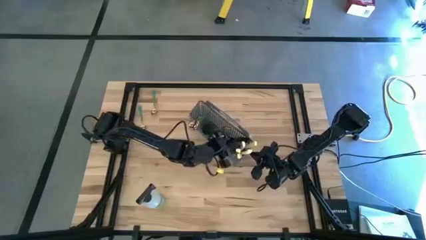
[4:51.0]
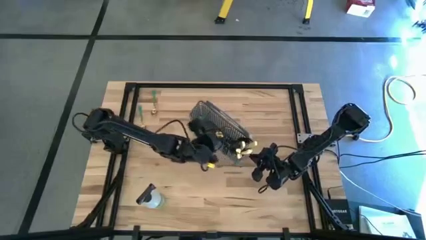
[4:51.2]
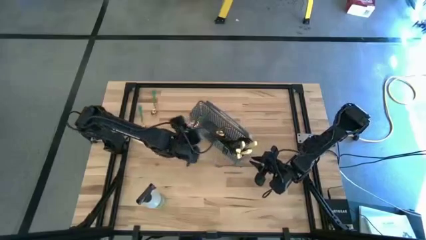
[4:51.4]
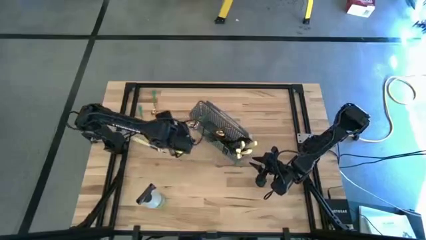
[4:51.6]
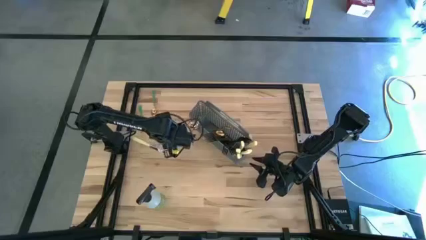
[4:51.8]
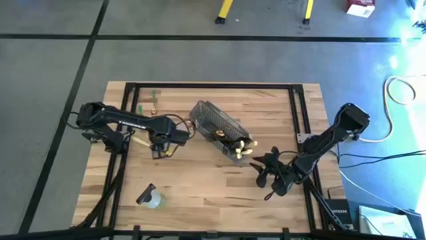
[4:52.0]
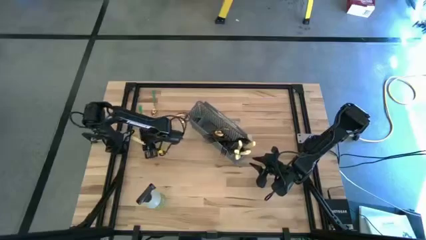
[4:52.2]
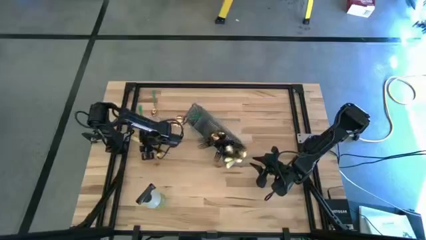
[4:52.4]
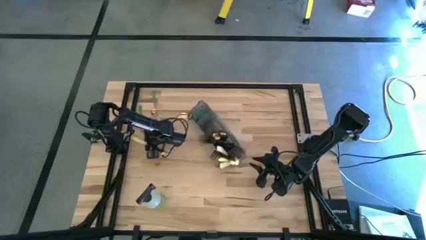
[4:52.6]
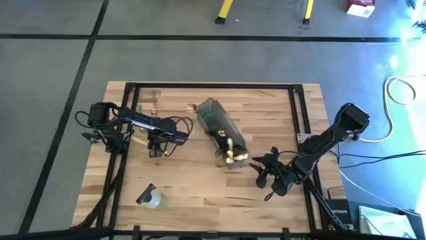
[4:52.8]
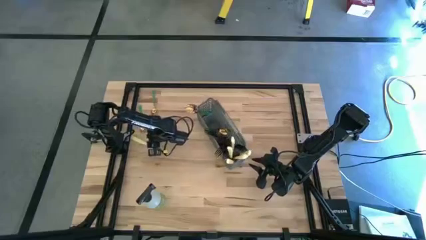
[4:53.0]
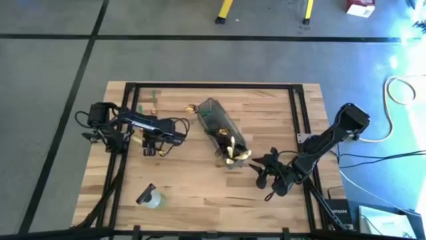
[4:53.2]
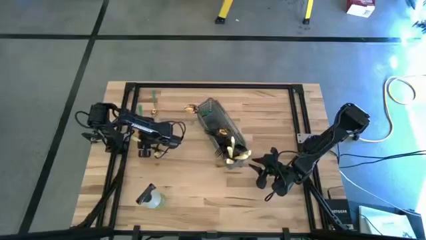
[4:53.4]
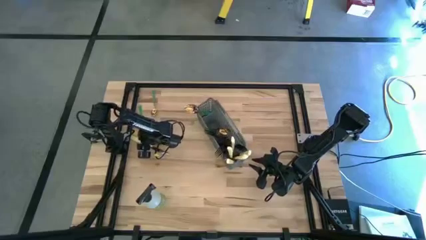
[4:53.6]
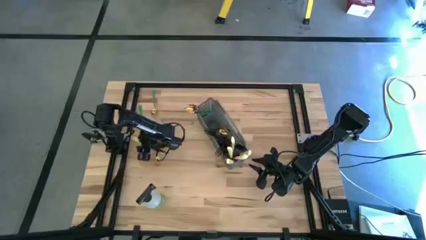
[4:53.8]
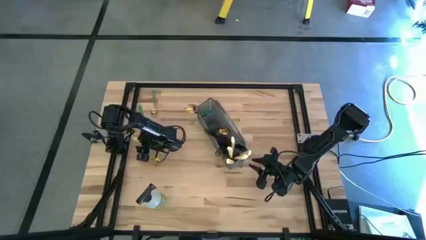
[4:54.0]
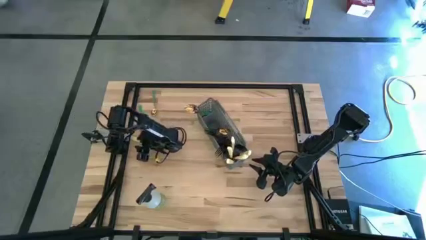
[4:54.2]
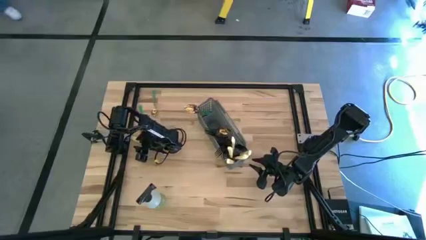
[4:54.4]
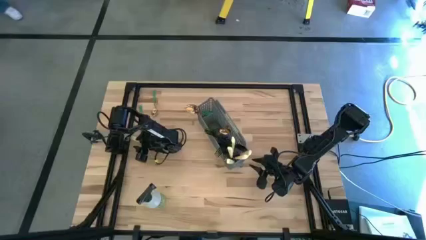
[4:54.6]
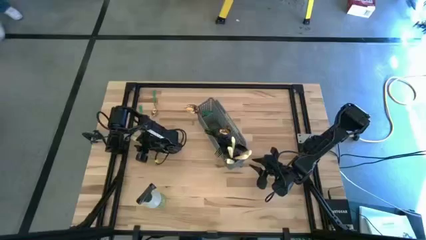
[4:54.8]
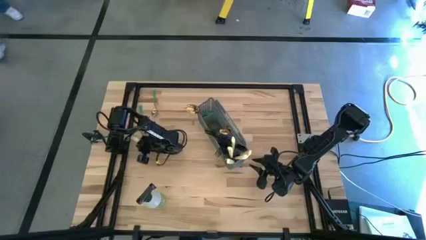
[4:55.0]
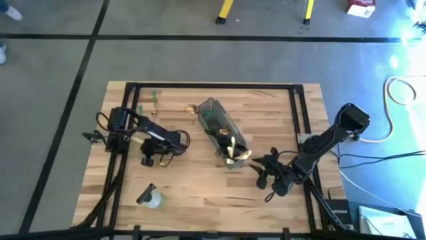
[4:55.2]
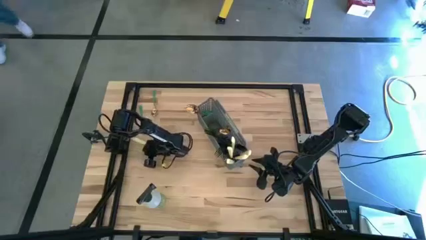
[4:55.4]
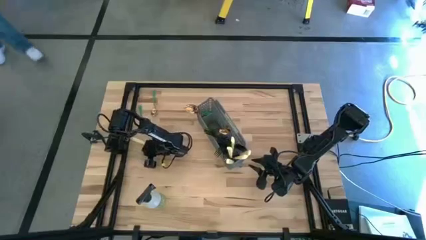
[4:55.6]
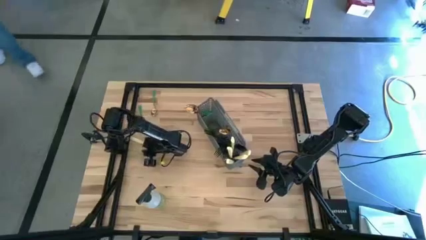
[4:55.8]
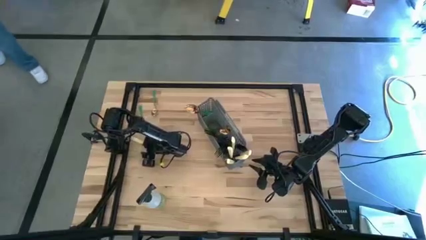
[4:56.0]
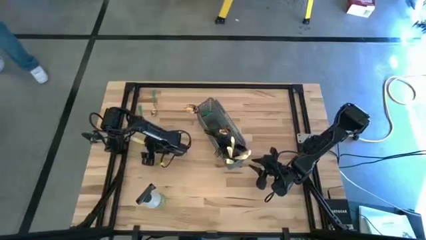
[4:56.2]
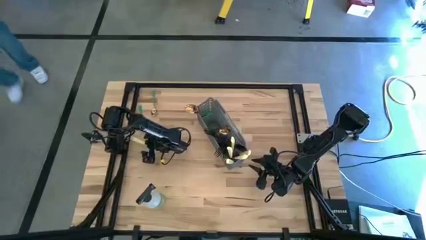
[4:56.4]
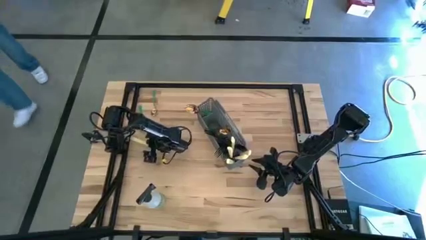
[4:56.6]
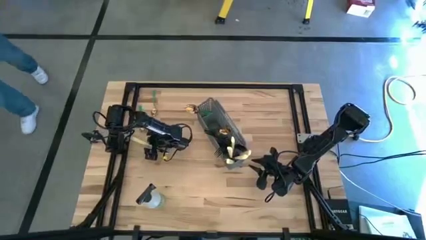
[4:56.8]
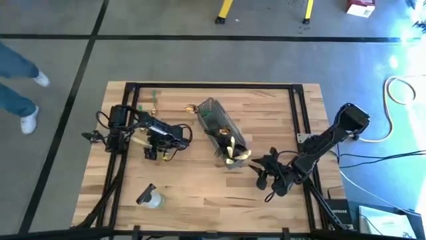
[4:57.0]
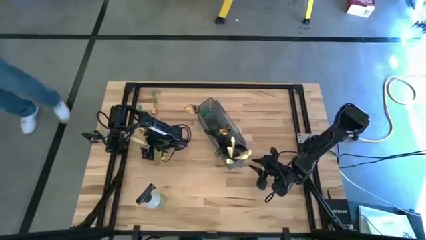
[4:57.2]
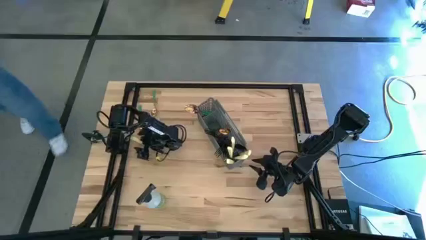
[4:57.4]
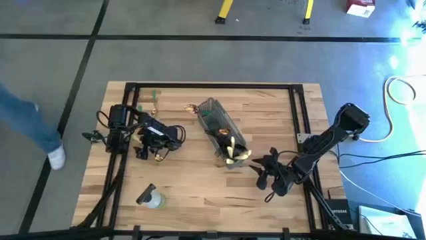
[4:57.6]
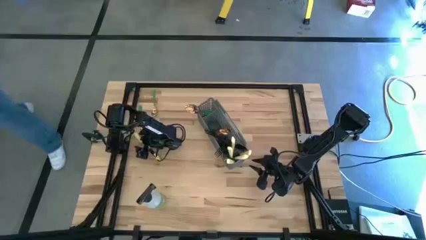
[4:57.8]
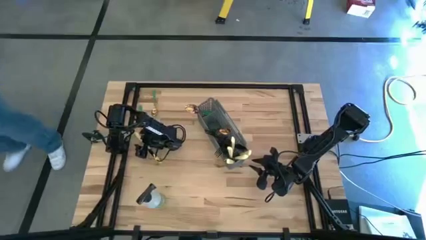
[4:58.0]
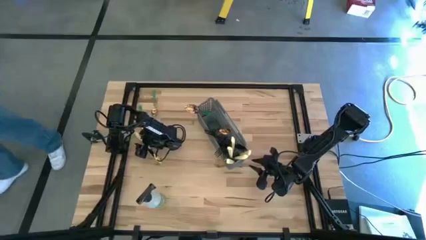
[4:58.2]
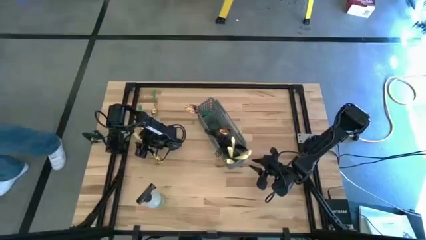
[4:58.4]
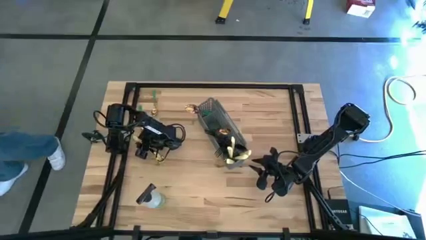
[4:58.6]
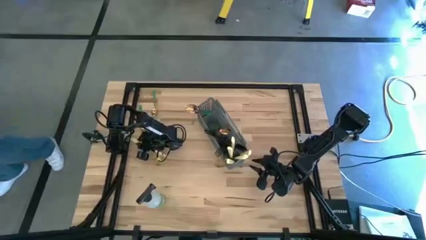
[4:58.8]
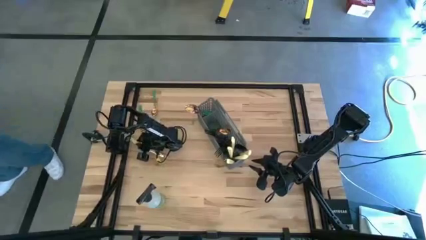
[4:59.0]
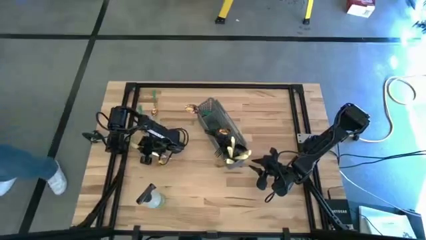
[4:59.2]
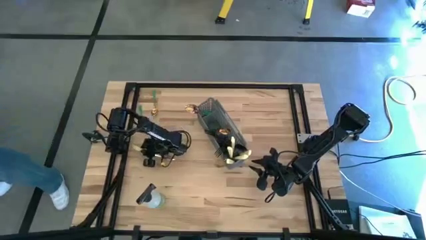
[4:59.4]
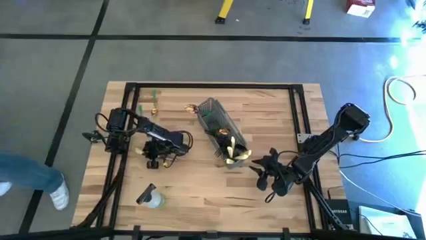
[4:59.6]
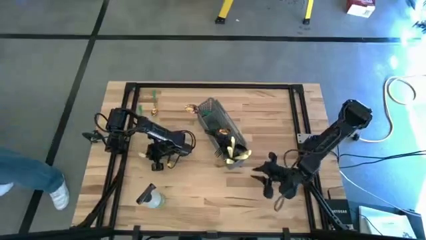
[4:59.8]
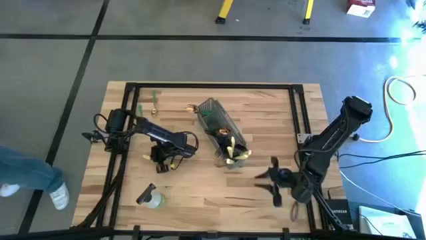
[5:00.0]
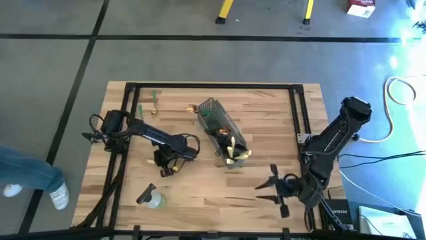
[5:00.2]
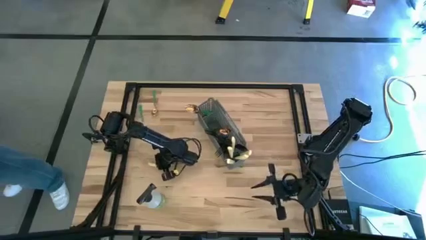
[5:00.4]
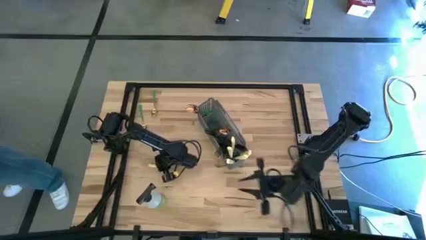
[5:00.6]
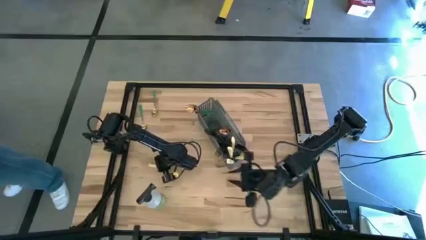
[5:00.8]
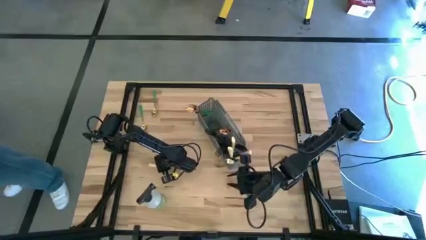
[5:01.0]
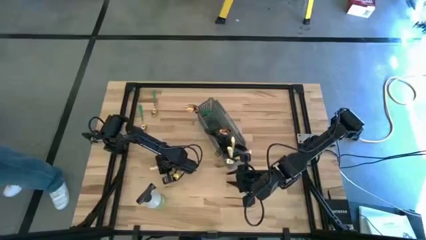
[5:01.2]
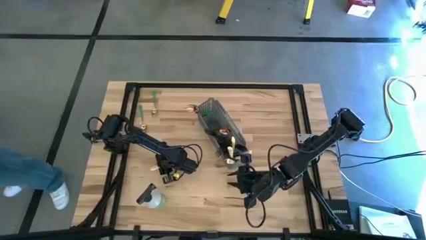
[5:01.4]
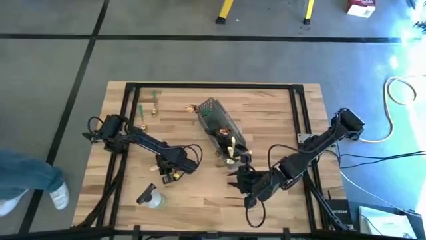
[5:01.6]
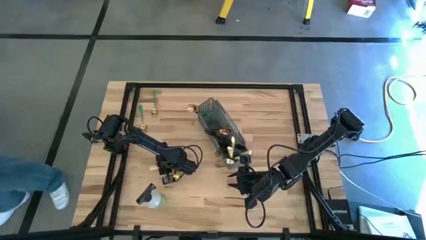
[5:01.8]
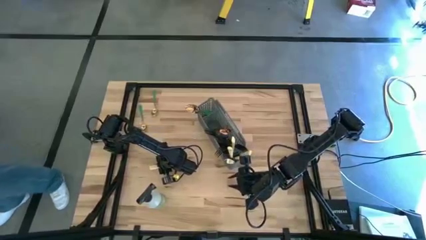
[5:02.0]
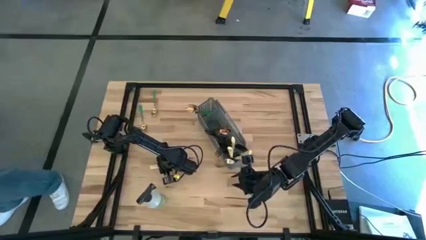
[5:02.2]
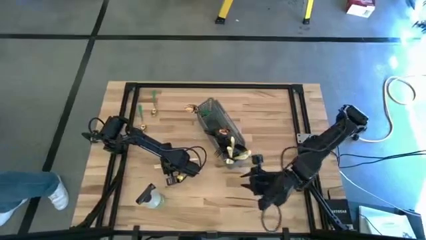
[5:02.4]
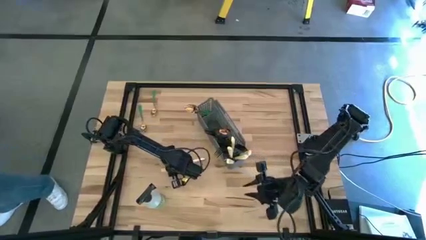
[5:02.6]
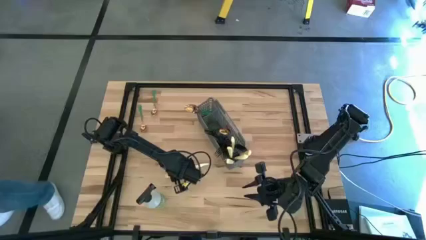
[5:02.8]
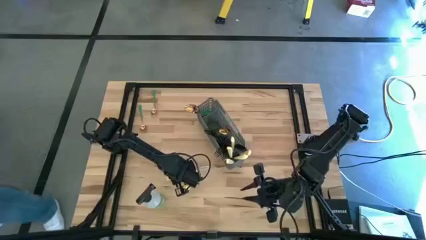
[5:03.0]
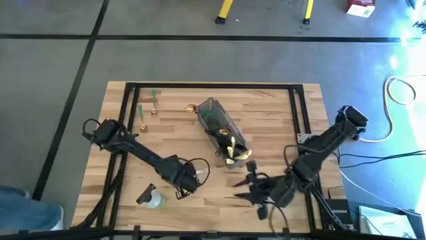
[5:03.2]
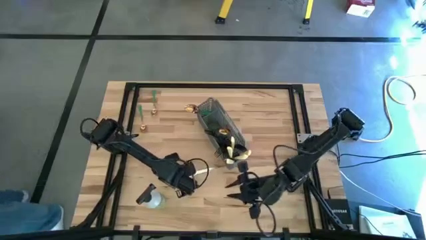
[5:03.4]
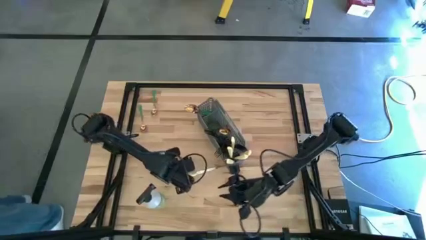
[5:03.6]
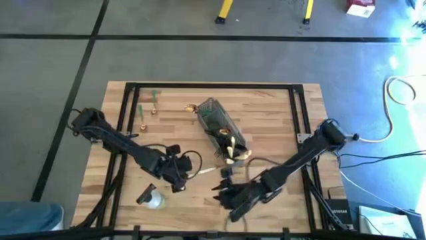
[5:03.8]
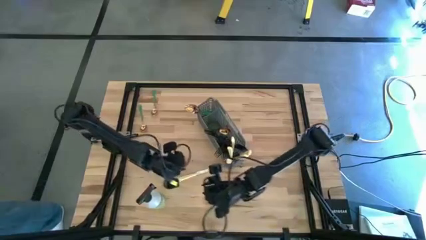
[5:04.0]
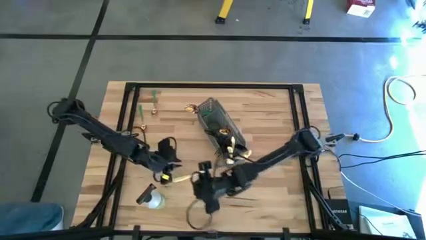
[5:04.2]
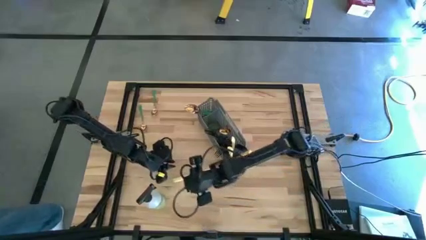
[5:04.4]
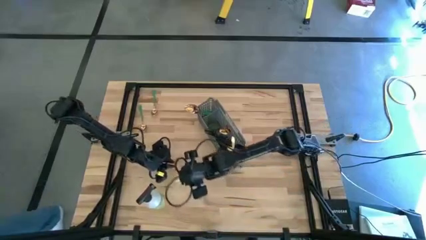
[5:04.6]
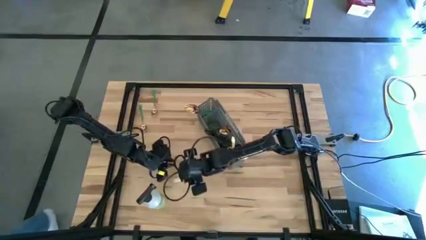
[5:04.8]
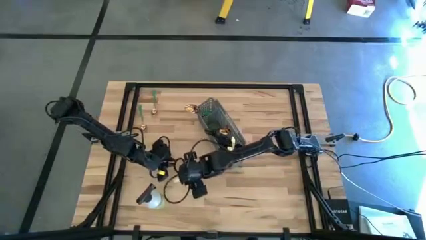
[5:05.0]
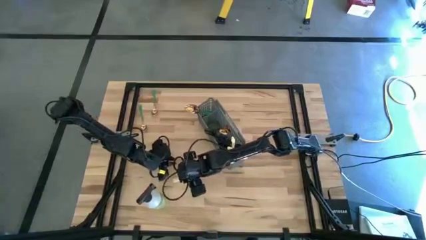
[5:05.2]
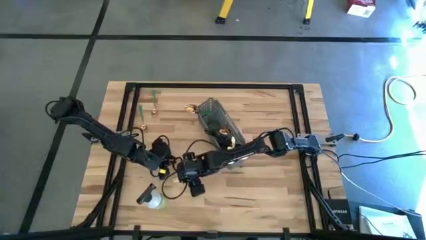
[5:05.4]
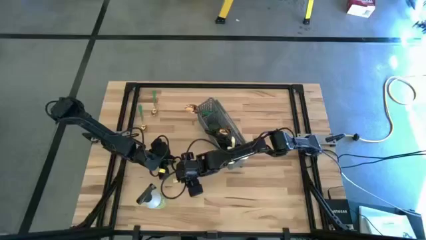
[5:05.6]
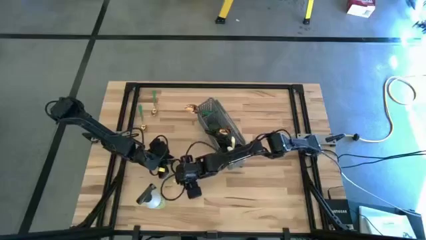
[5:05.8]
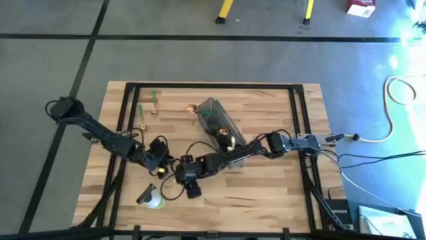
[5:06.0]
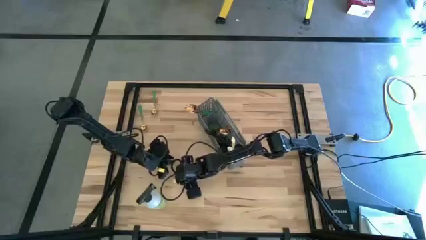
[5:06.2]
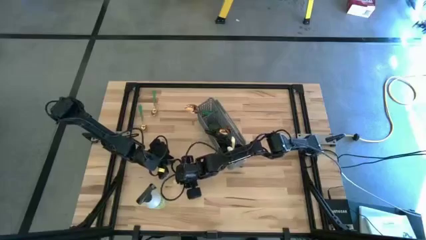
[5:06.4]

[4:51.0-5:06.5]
Task: Sort silverware
Put the silver knife into the cutlery rack

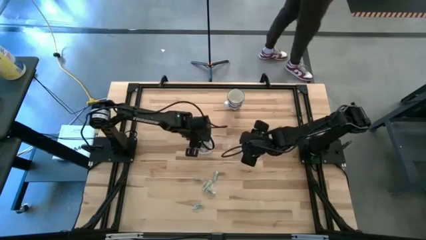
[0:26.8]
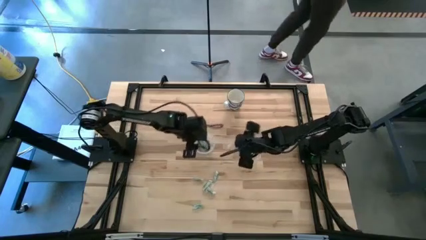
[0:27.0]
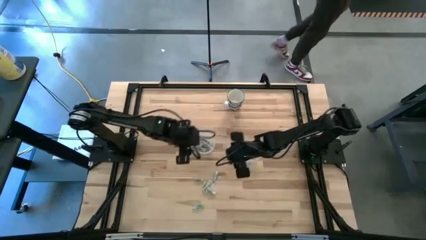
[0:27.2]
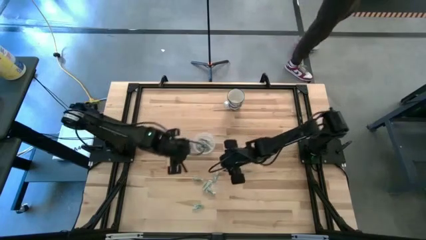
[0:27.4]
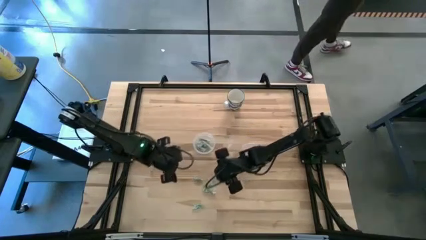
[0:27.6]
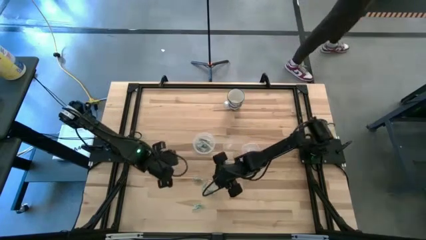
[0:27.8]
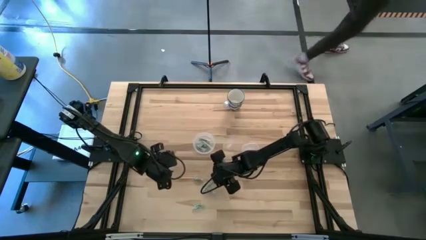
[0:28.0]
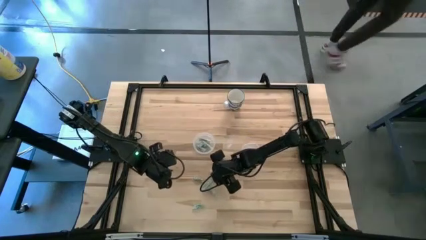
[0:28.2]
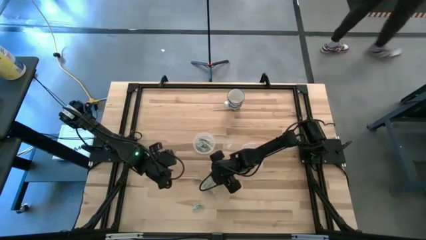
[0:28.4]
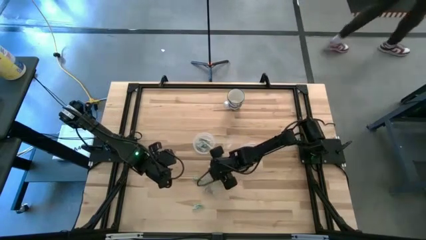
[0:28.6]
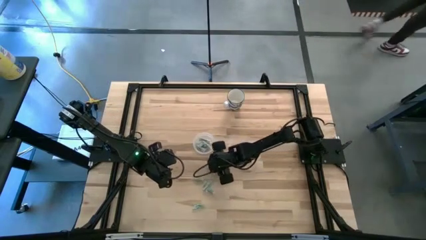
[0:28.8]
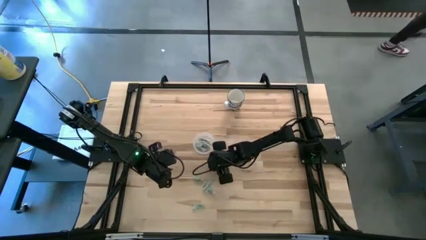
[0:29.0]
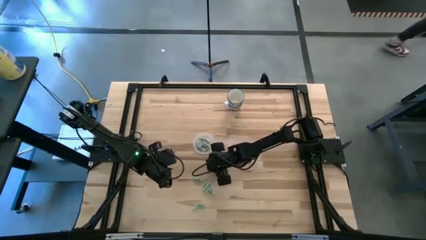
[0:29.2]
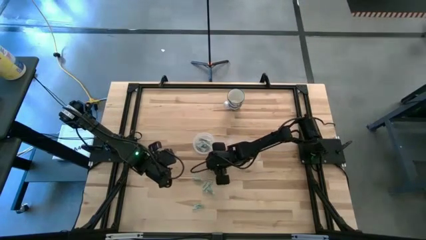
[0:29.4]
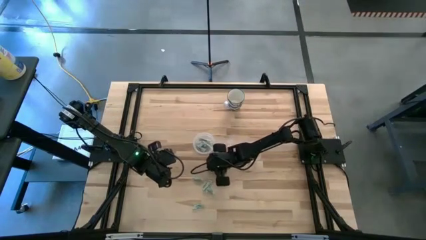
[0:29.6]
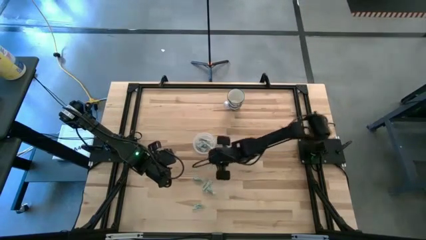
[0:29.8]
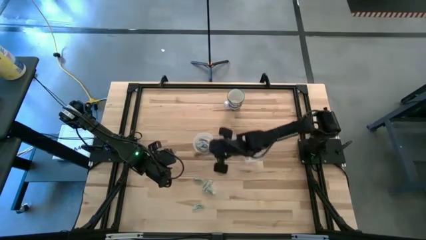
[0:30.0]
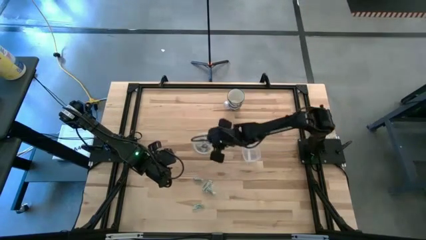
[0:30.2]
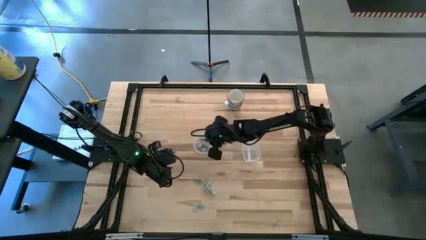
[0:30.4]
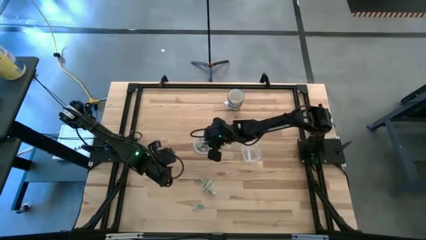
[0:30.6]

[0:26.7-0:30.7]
Task: Pick and place Stevia / Truvia into bins
Put the green stevia packet into the left transparent container
